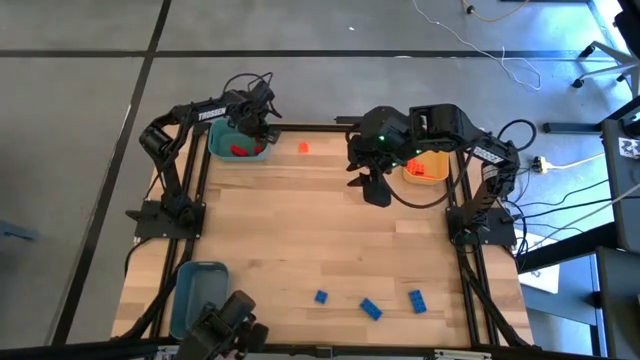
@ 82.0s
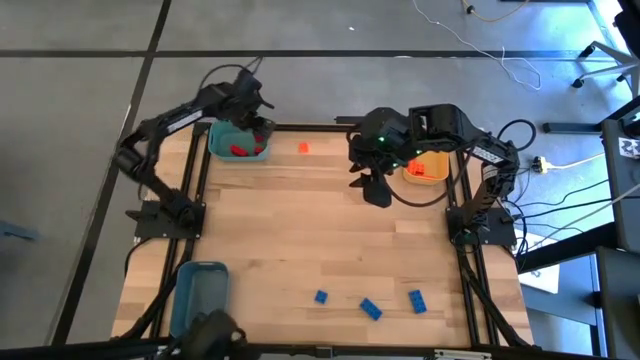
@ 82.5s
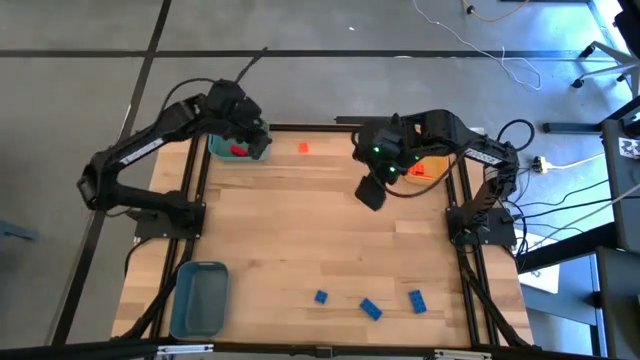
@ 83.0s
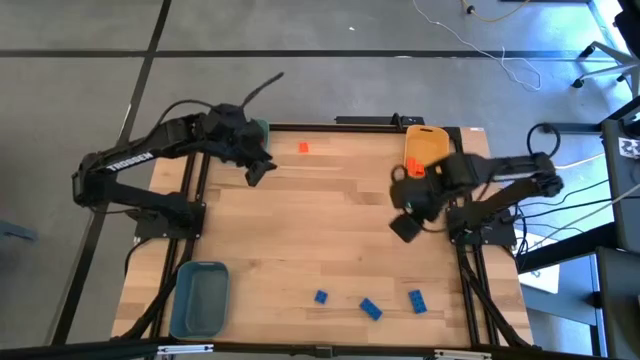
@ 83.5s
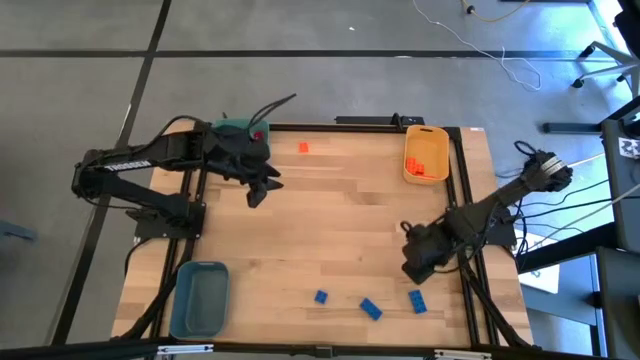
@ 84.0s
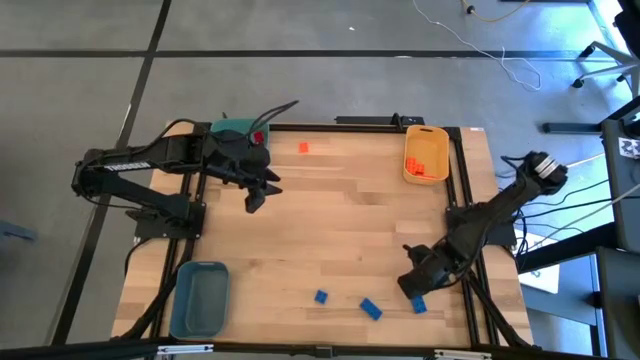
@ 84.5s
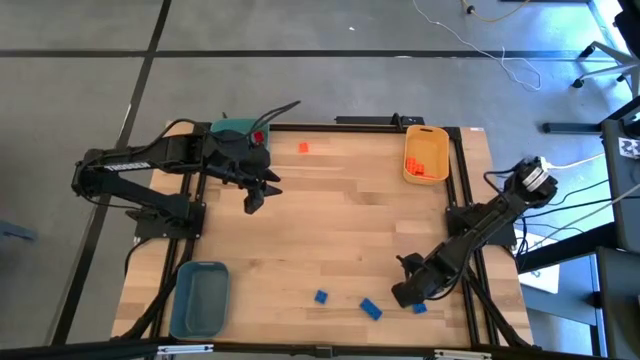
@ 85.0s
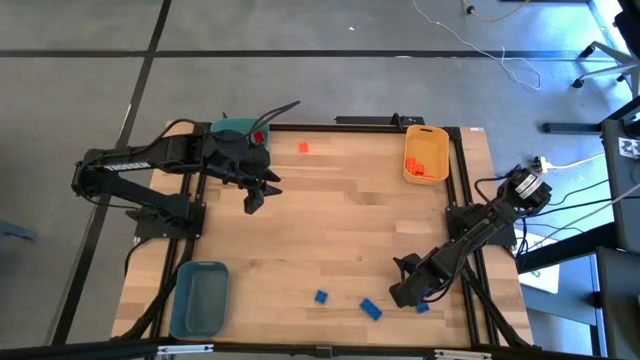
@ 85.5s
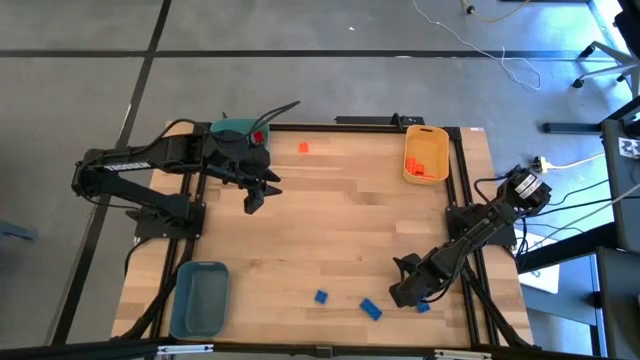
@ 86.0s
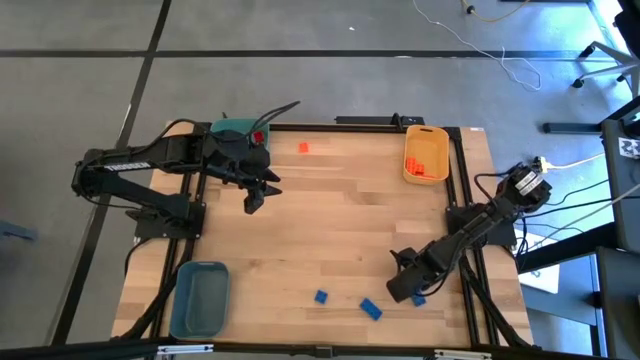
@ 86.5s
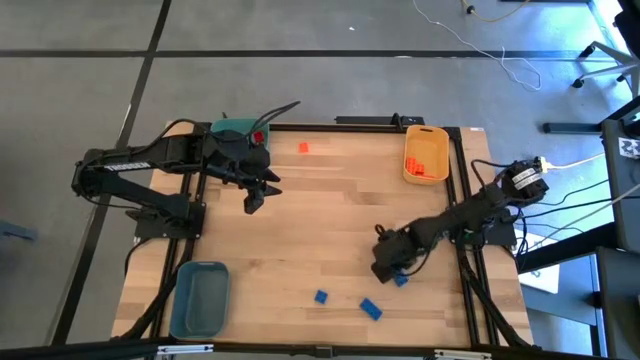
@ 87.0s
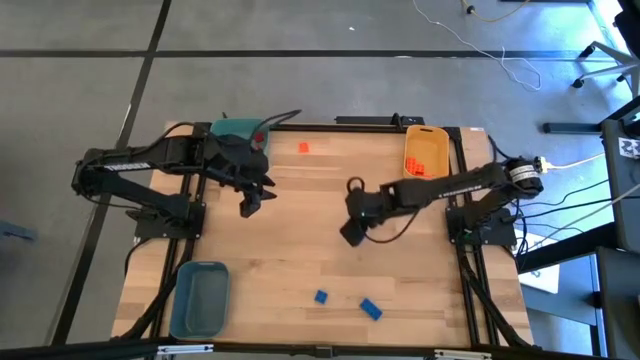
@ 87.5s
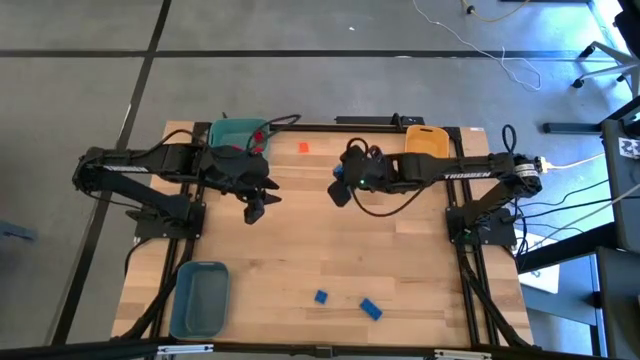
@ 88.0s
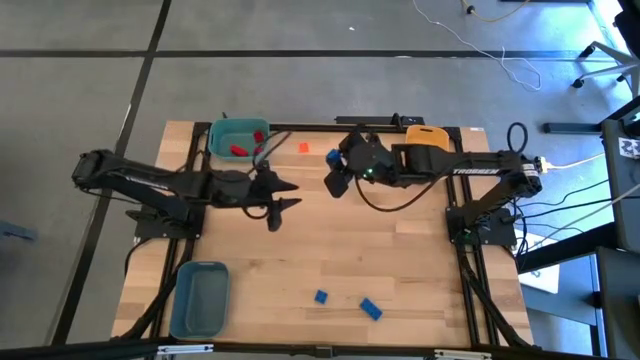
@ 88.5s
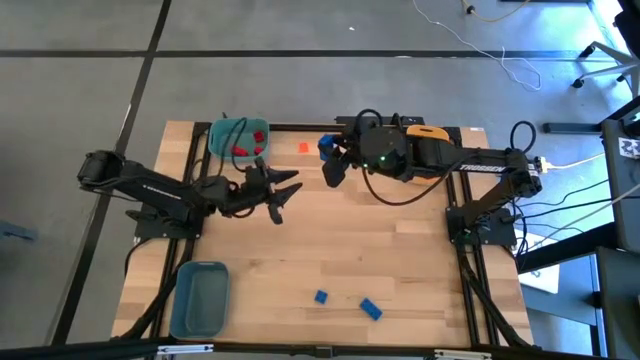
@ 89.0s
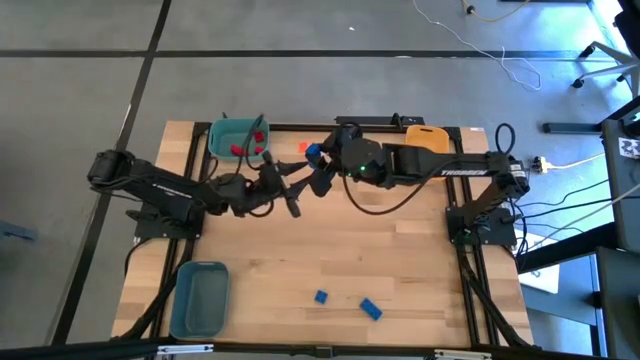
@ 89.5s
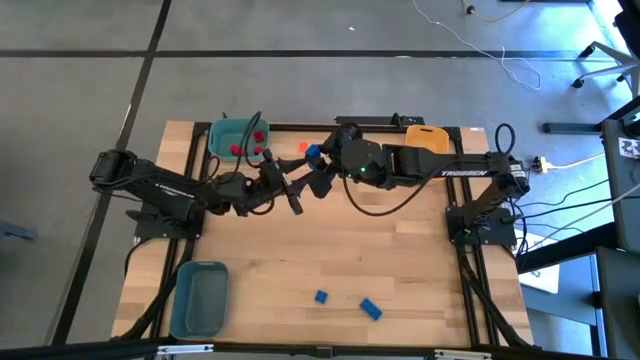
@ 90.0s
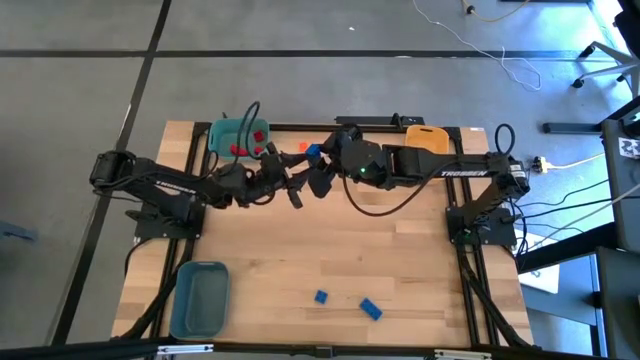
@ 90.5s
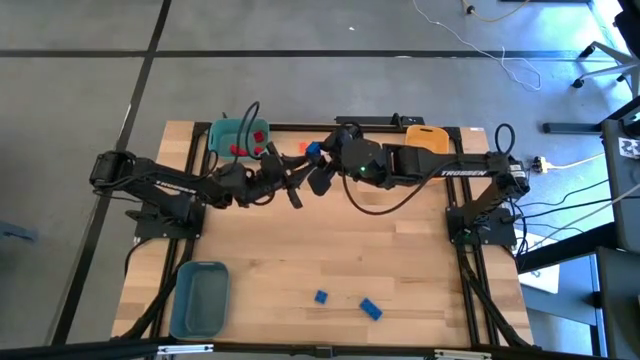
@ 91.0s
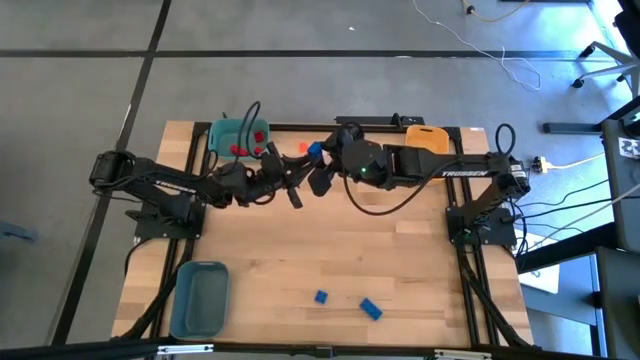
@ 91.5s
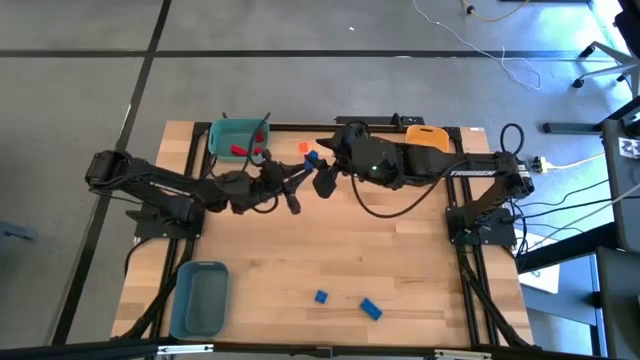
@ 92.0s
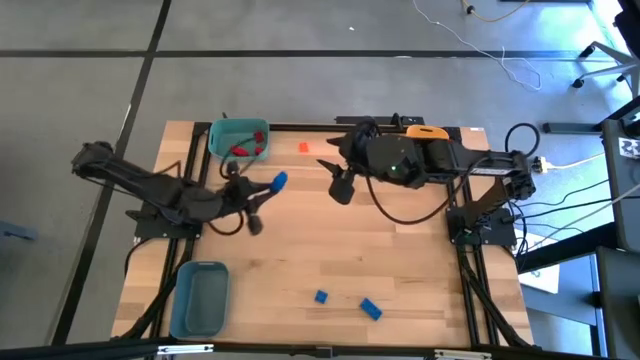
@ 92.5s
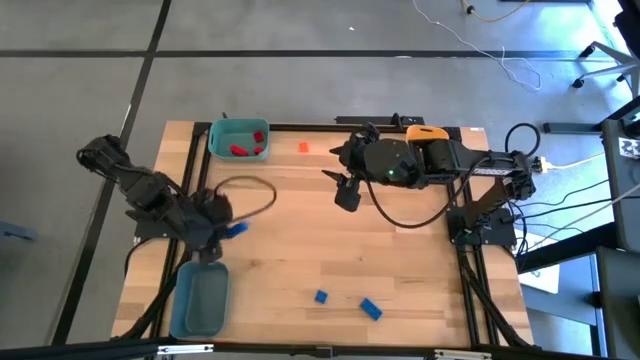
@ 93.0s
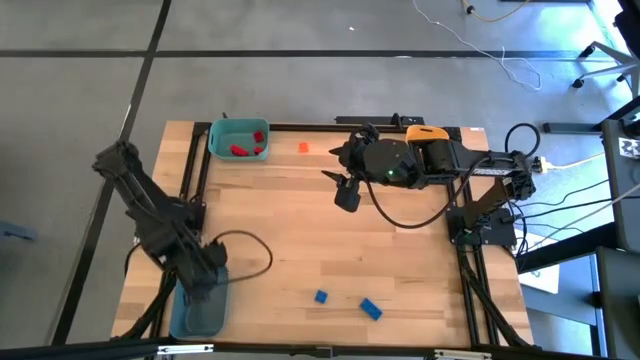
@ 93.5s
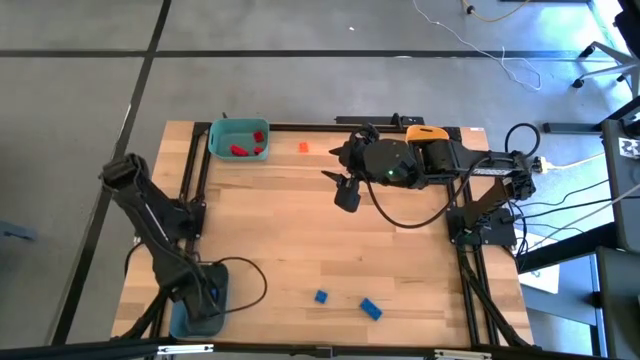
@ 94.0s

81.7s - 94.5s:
Task: Sort & place blocks by color
Put the blue game piece into the gray bin

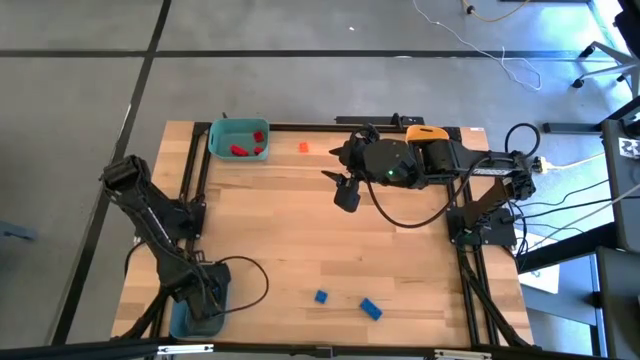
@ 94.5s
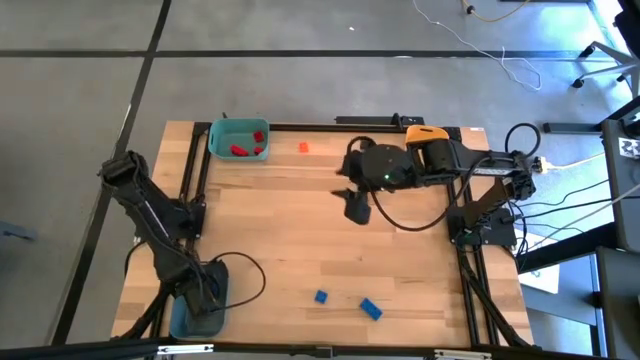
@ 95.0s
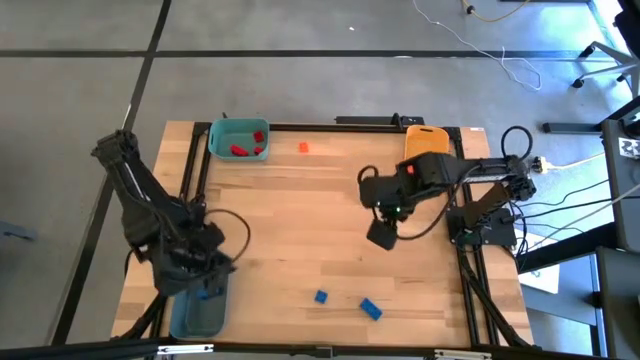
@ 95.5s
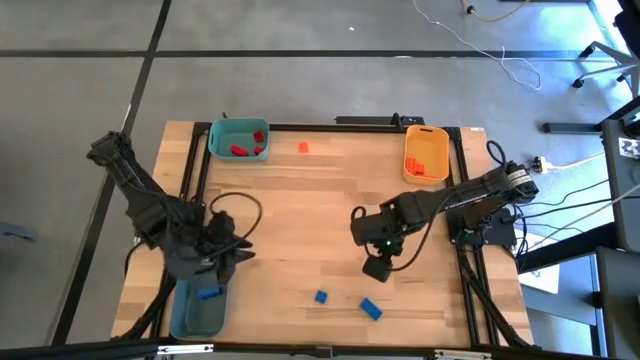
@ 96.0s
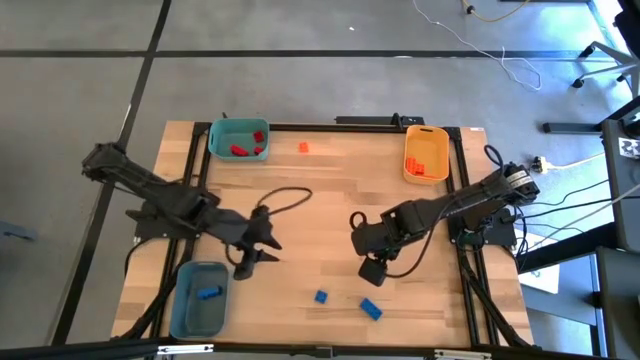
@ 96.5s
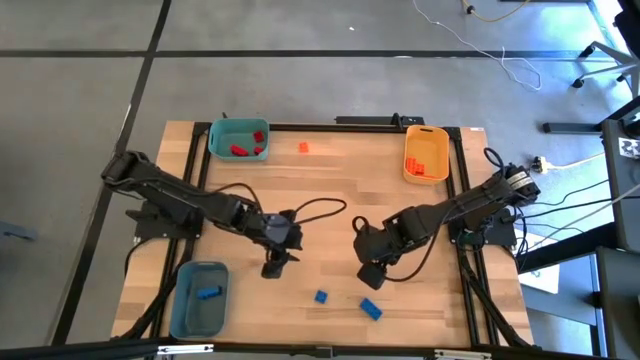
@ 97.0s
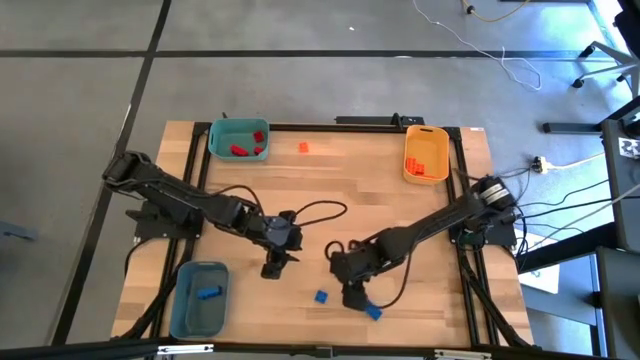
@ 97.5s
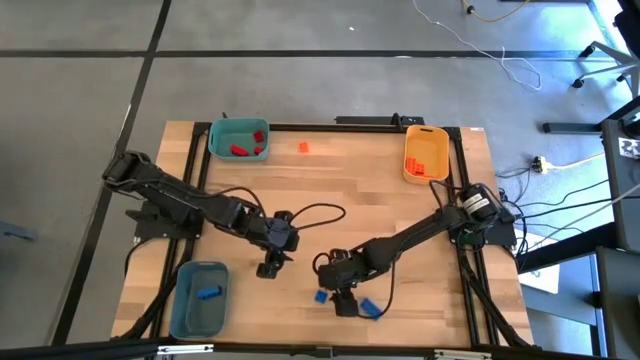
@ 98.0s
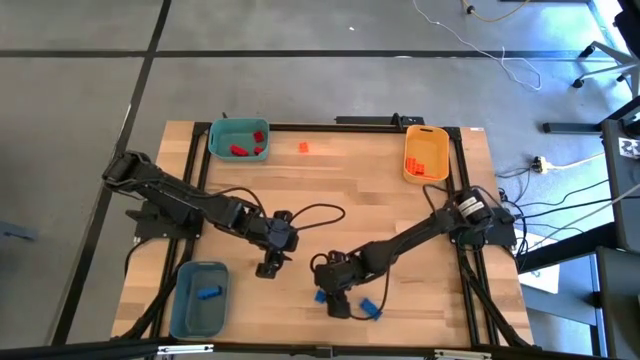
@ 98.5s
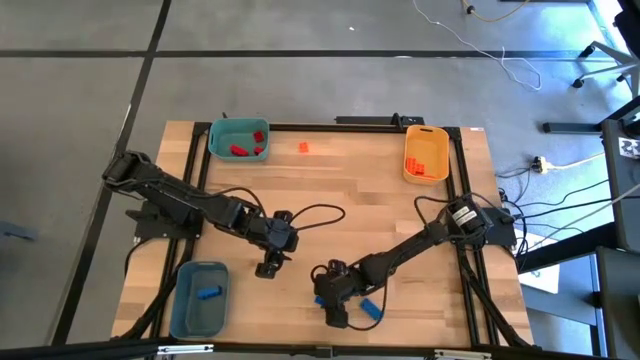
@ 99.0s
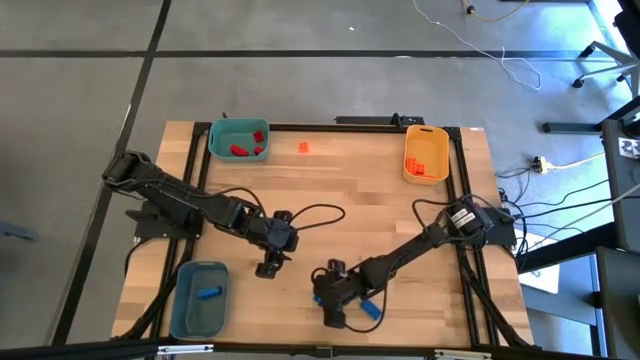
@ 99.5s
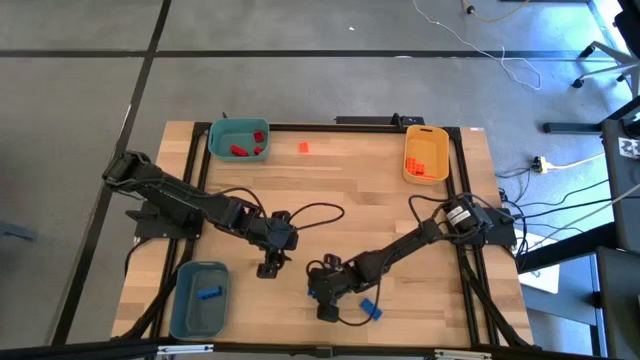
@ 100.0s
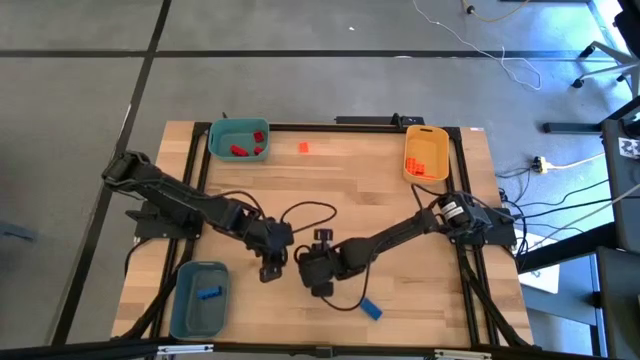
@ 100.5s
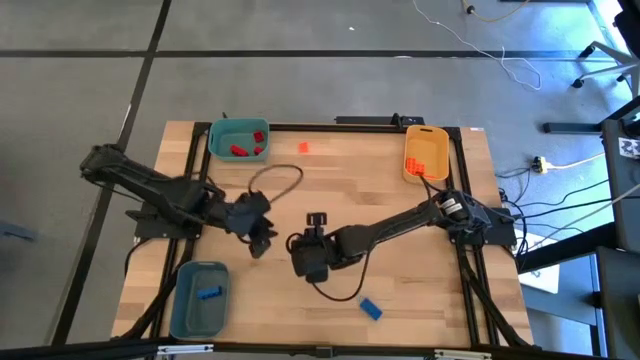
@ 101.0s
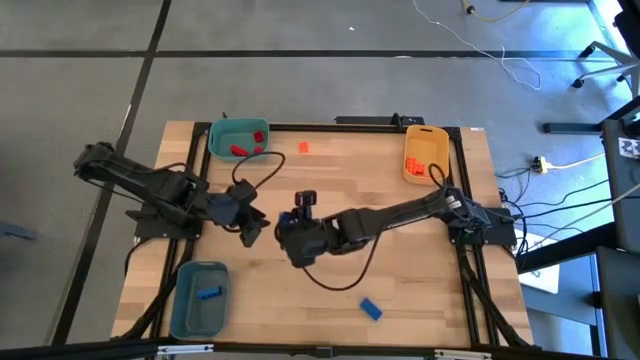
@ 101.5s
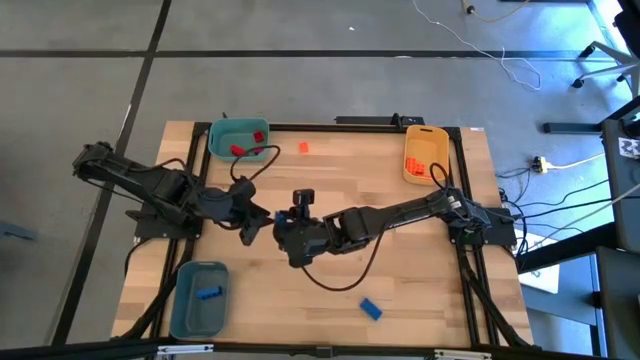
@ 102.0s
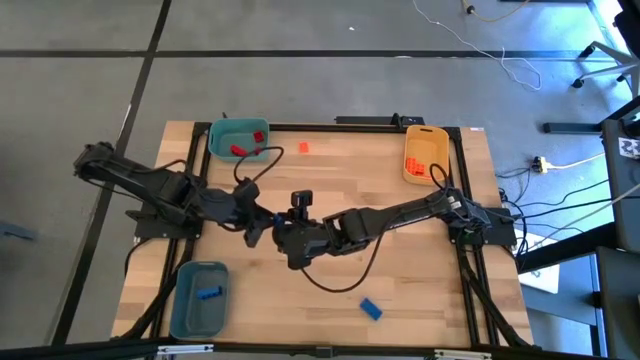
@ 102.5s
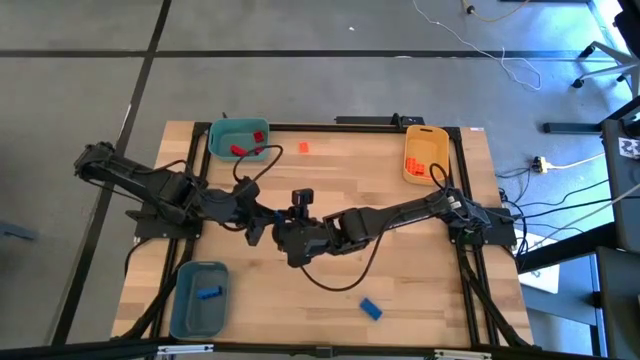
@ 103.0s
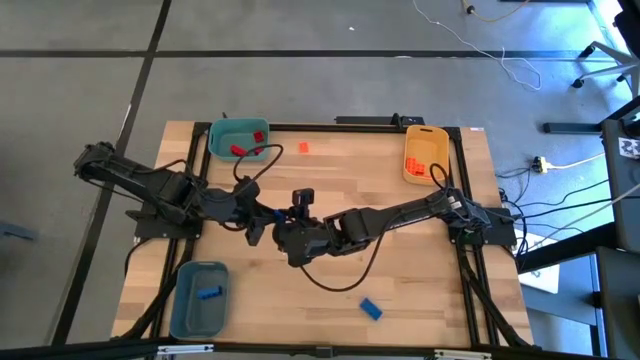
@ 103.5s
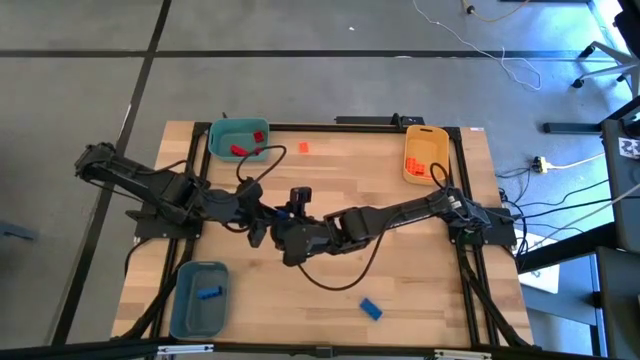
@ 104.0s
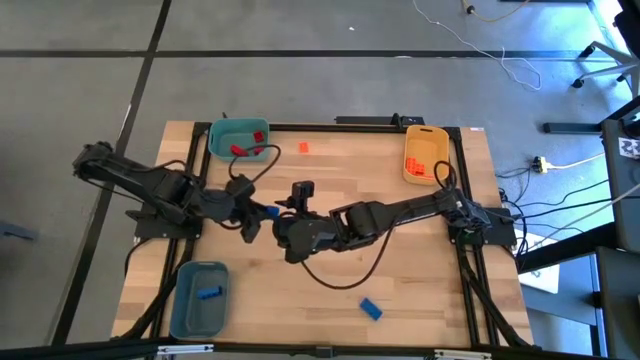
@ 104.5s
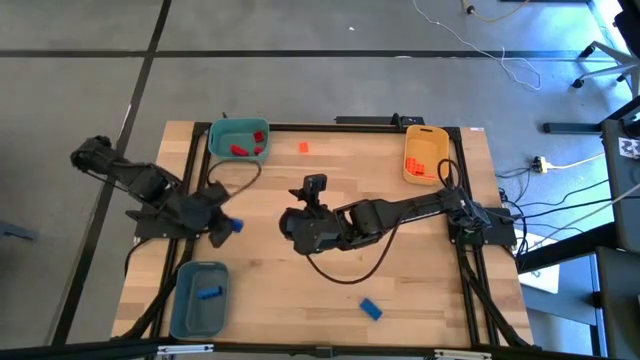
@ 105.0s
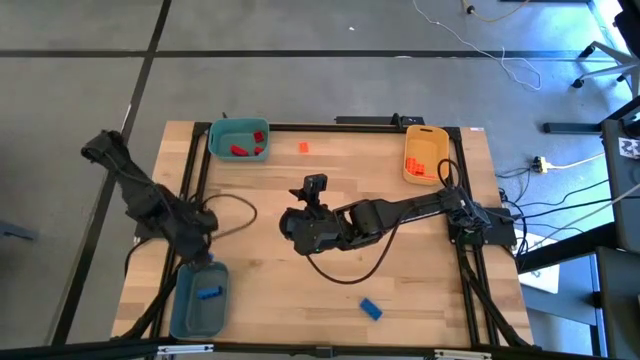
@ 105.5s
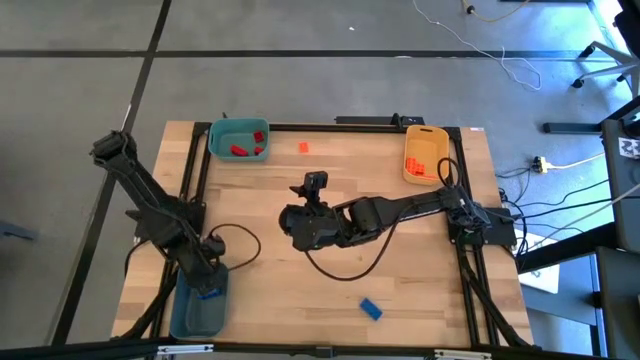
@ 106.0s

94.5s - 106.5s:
Put the blue game piece into the gray bin
